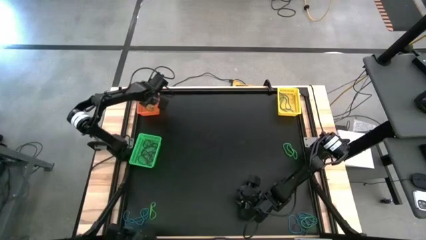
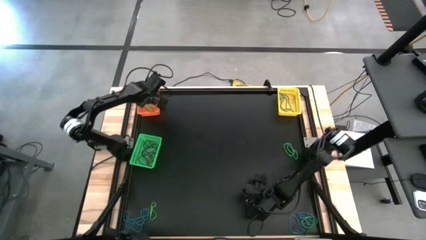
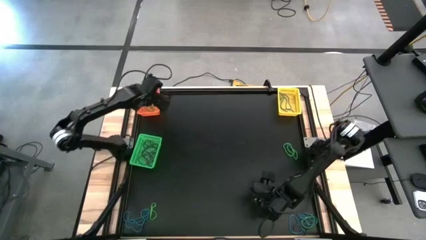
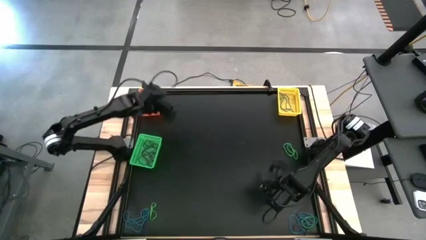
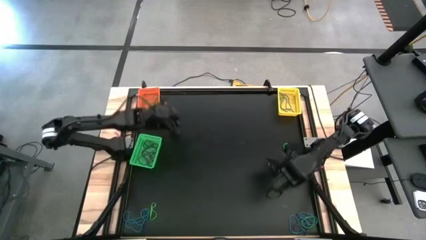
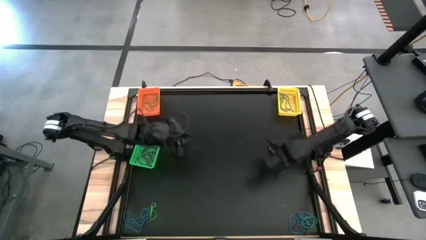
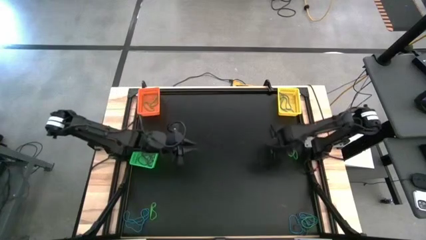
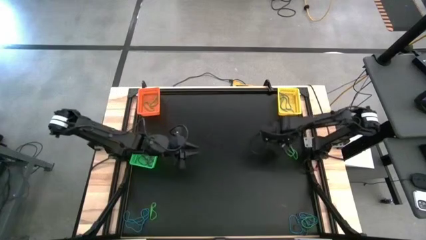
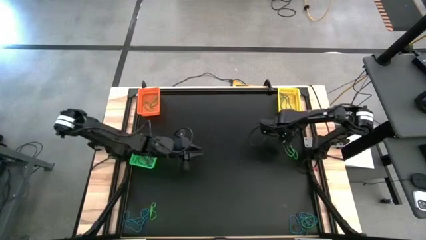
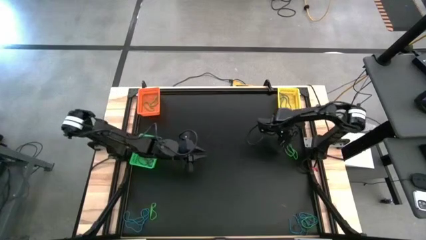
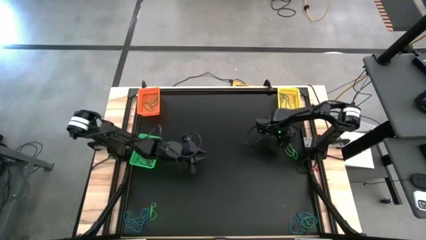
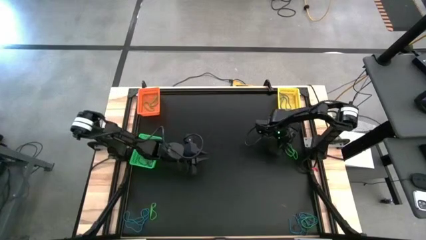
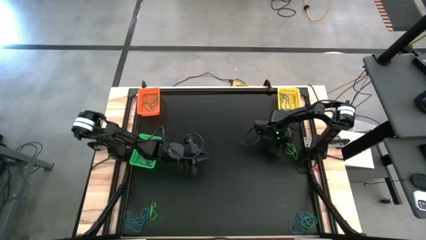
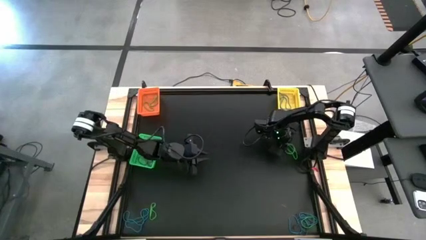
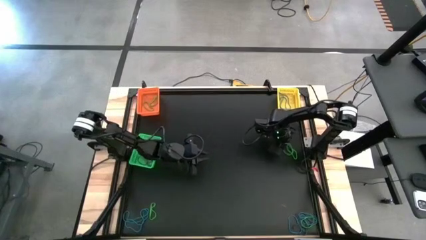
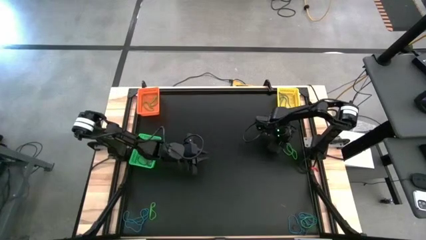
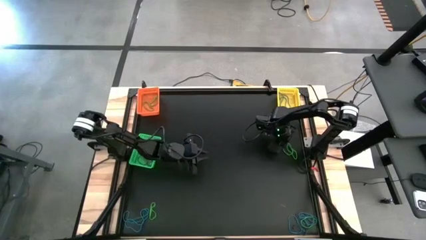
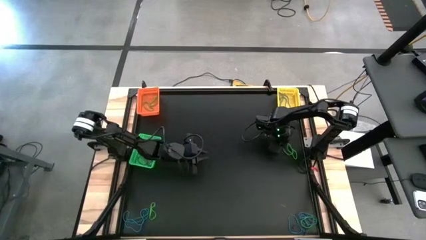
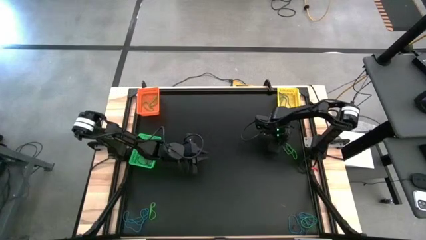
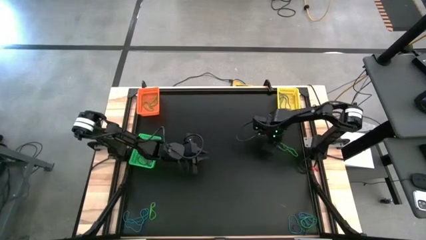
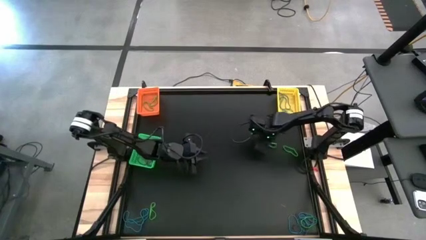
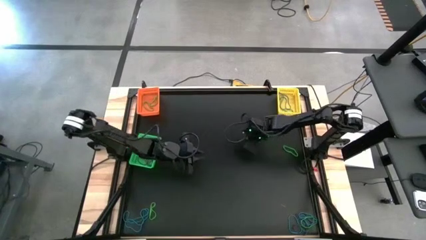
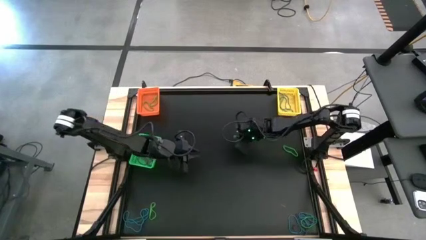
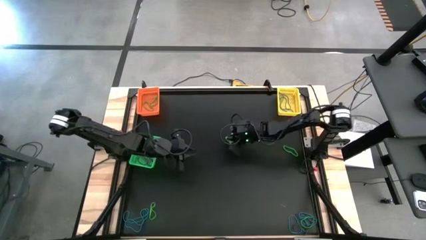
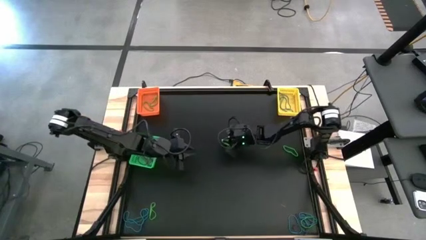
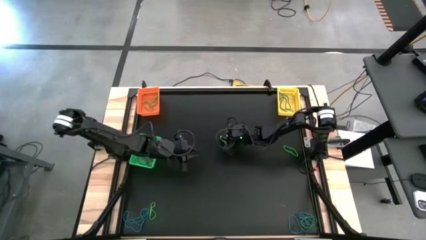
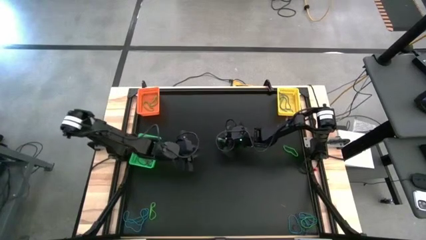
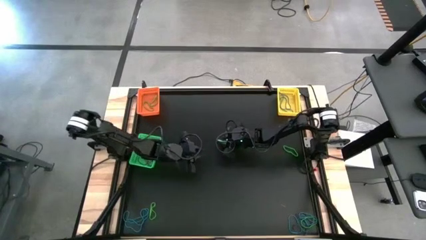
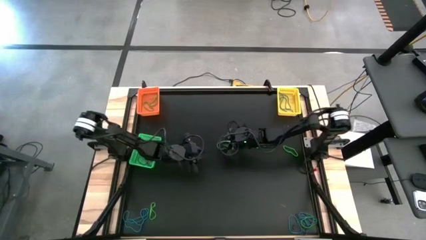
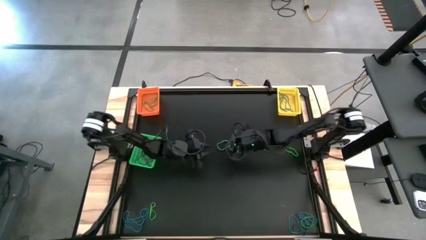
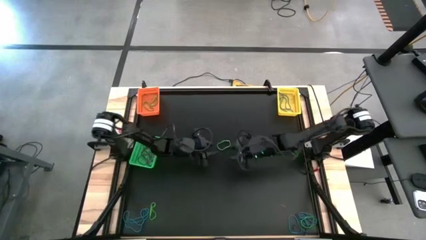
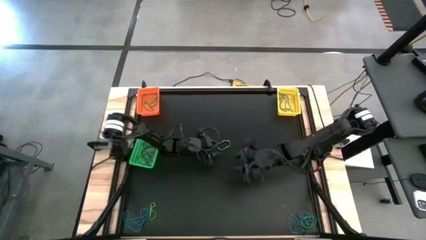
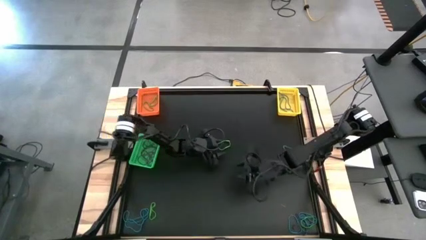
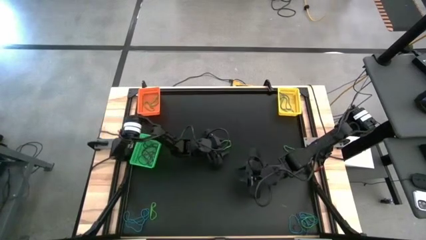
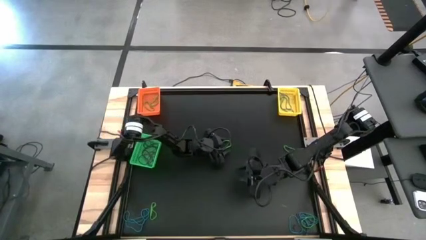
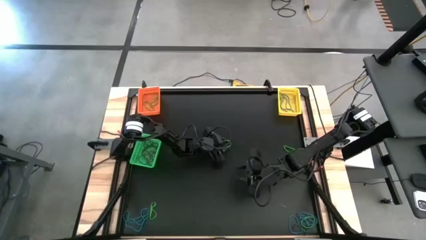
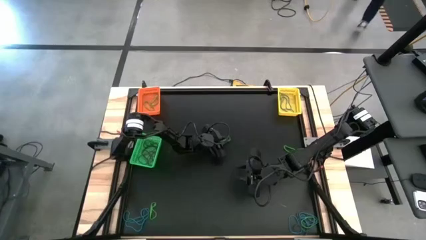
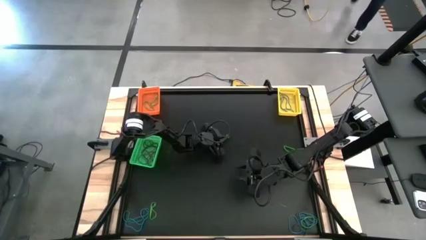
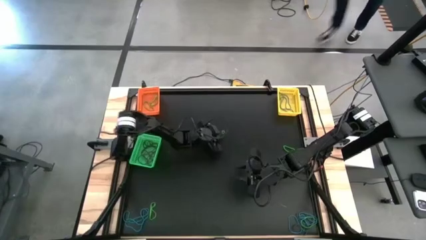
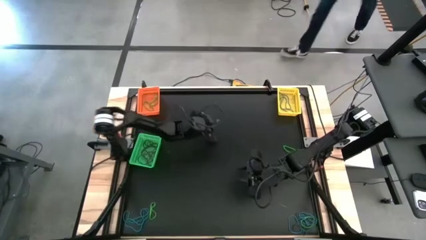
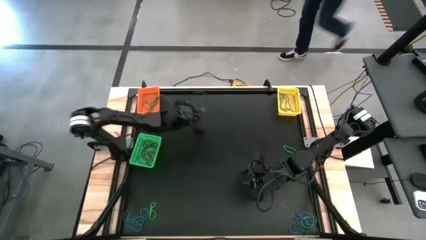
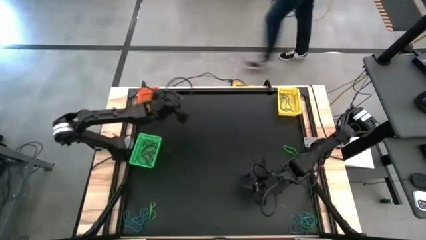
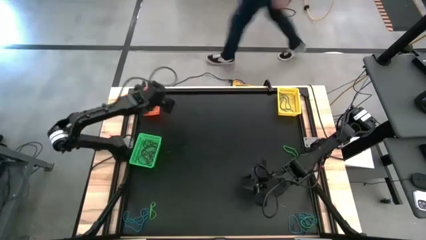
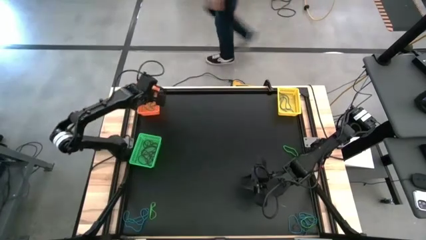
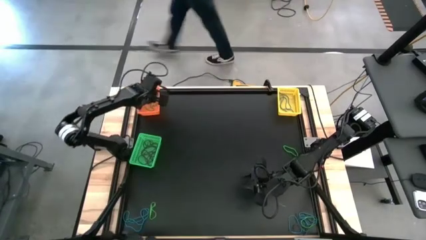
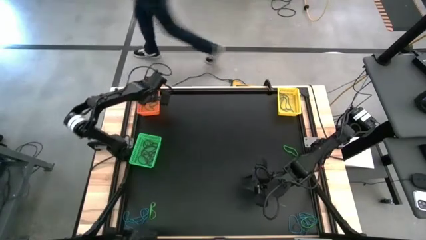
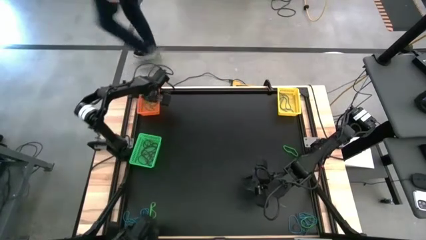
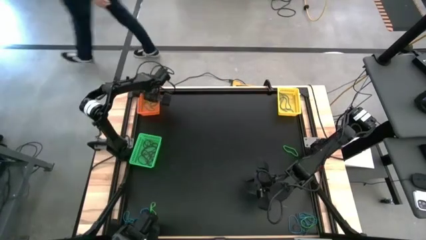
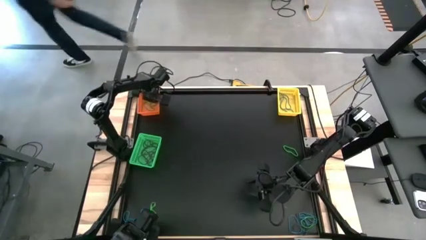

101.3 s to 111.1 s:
Task: Sort rubber bands into baskets
Put the middle right green rubber band into the orange bin

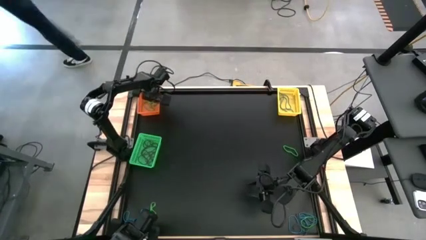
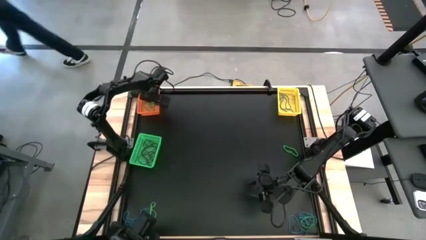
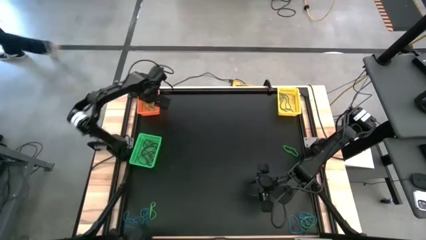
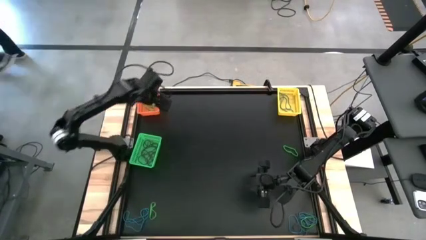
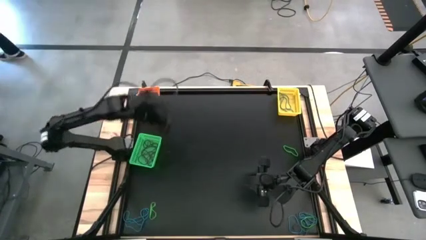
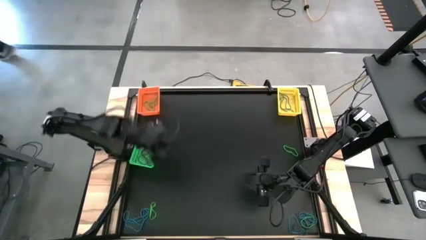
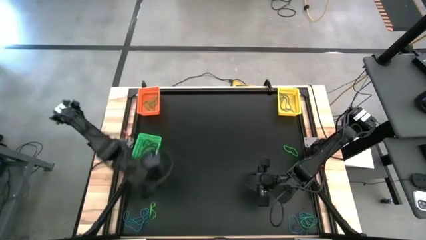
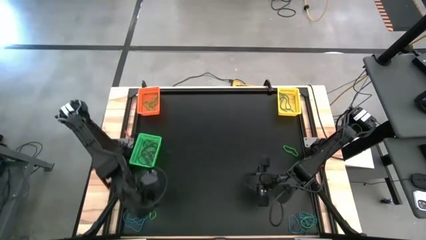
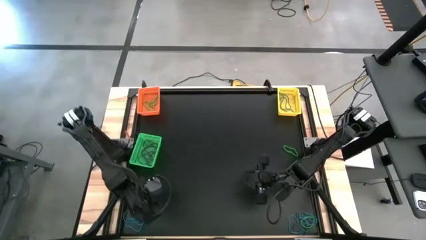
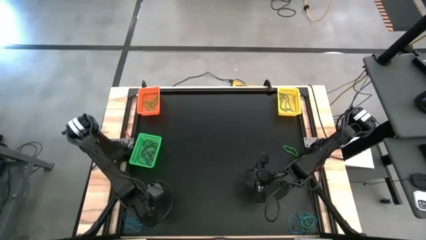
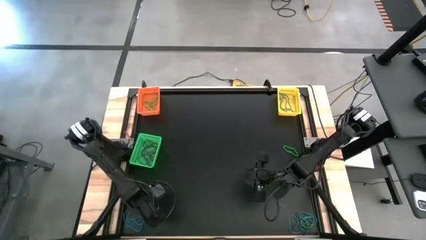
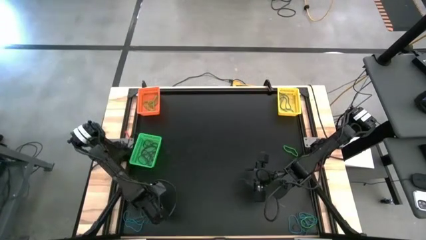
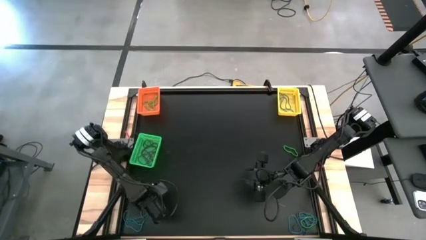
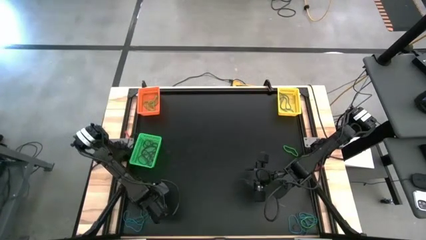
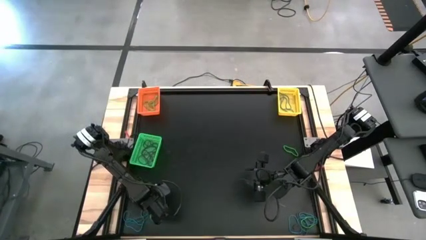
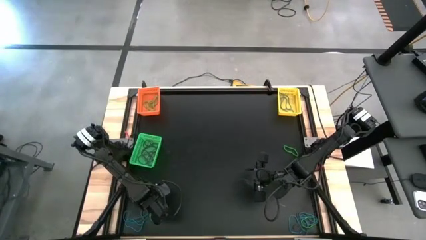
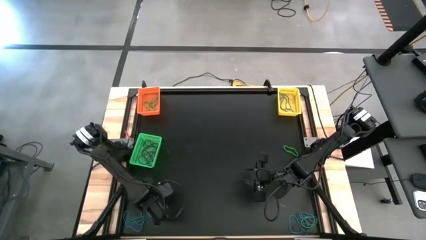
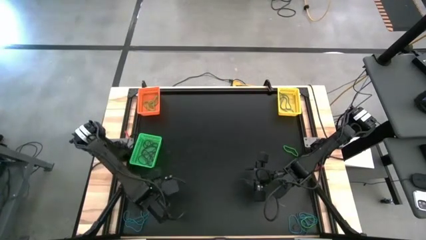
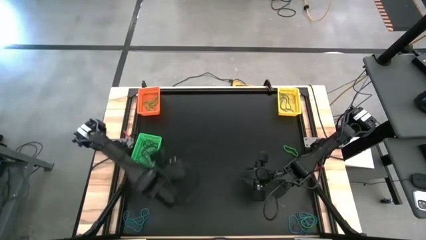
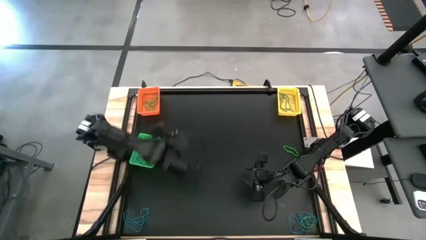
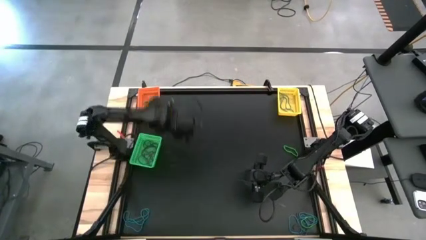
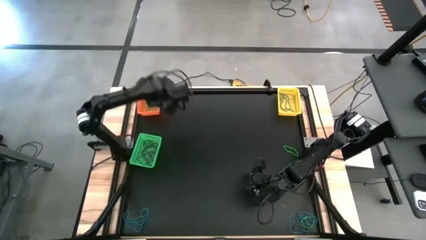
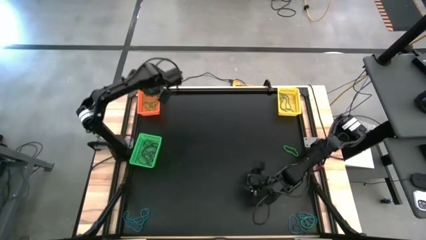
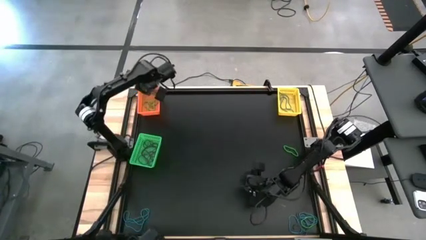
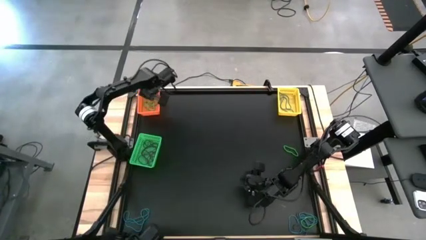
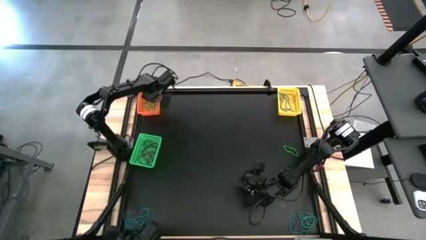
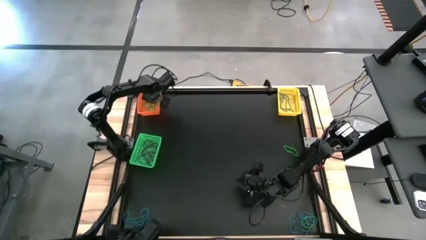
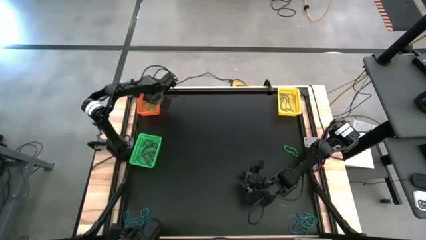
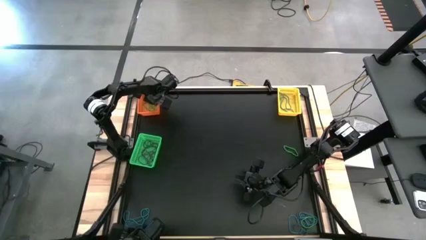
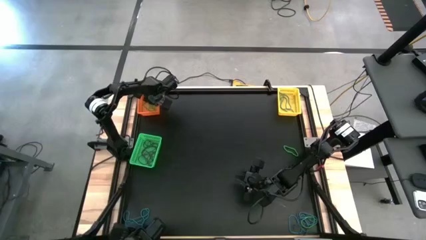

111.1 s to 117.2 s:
Put the bottom left green rubber band into the orange bin

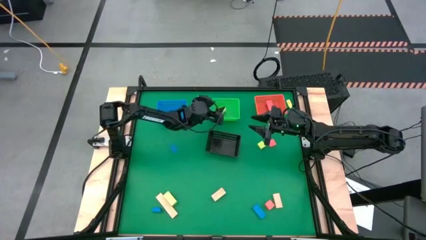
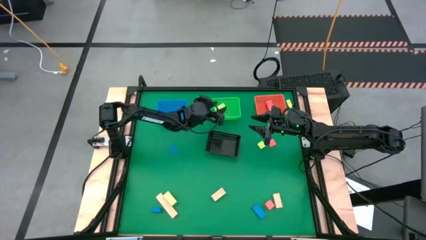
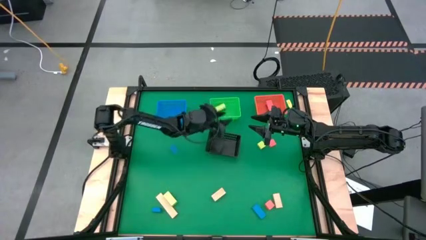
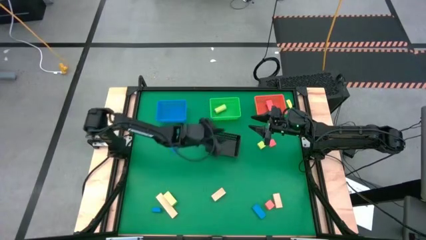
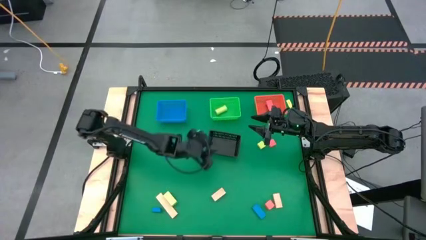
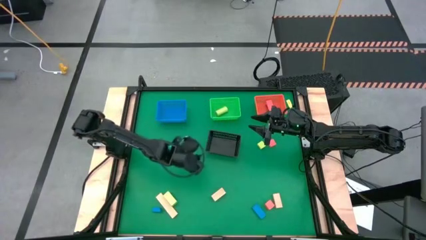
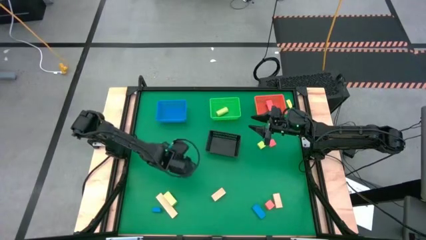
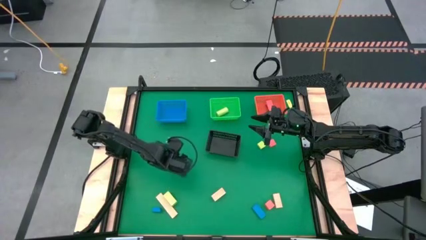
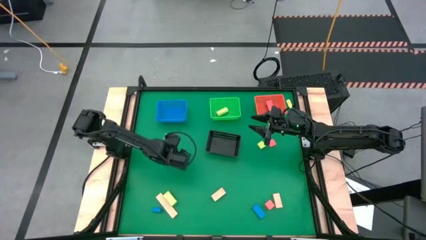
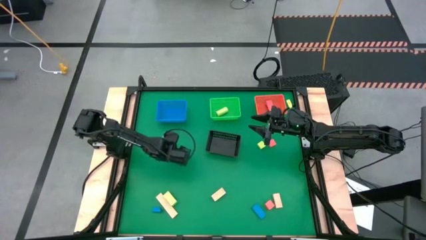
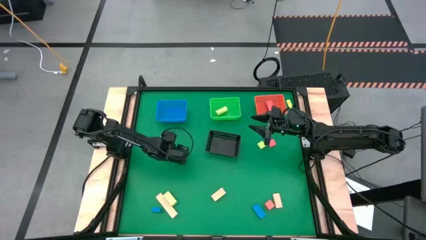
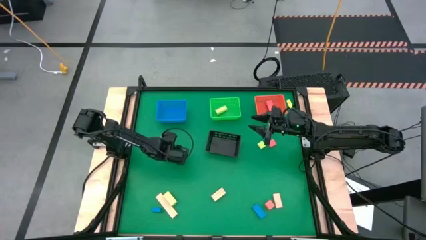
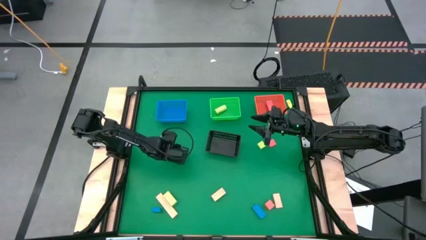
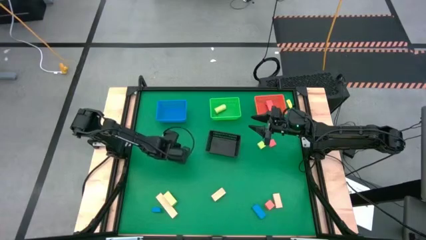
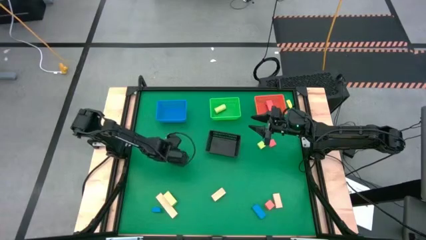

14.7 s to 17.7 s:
Task: Sort & place blocks by color
Put the top blue block into the blue bin
